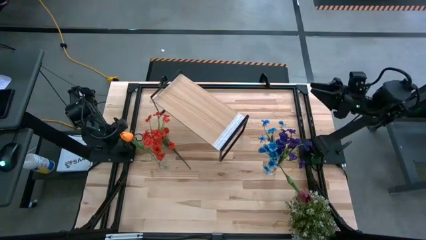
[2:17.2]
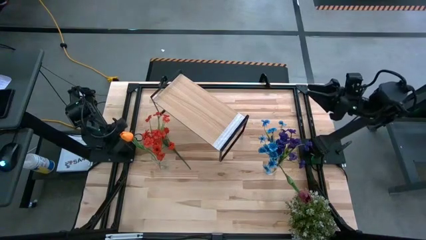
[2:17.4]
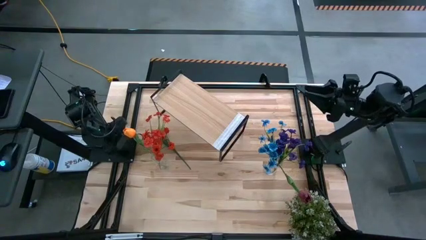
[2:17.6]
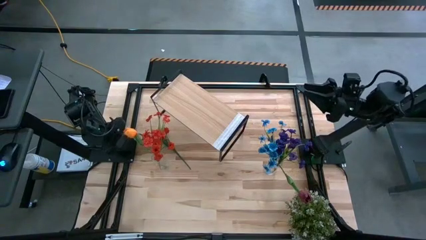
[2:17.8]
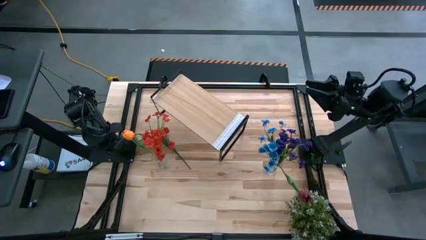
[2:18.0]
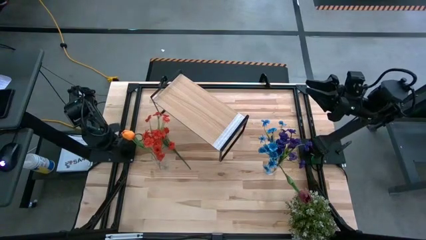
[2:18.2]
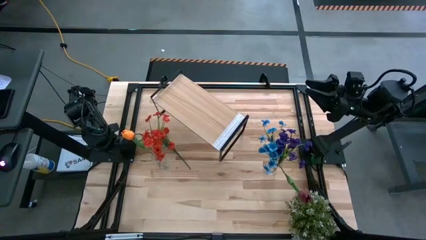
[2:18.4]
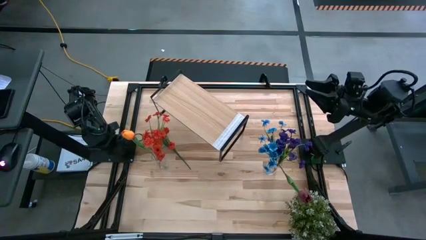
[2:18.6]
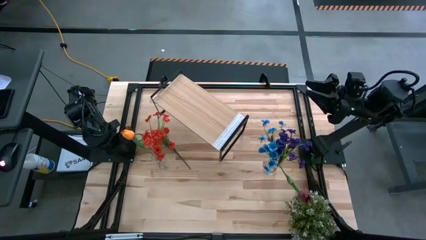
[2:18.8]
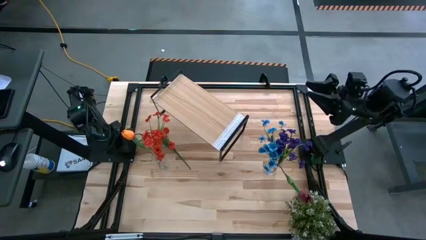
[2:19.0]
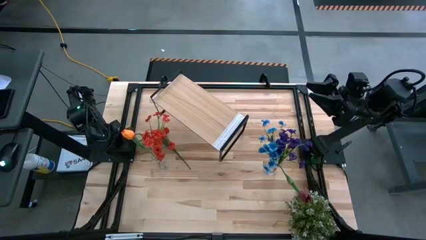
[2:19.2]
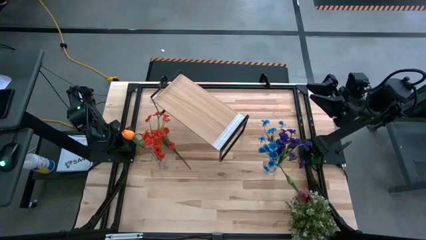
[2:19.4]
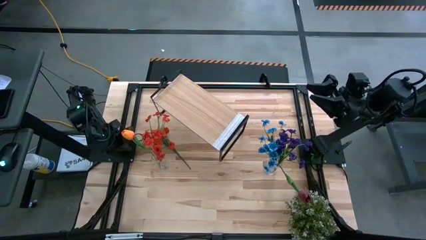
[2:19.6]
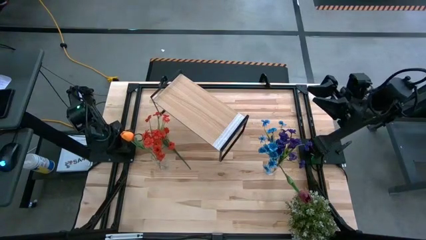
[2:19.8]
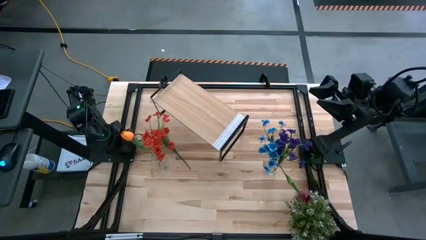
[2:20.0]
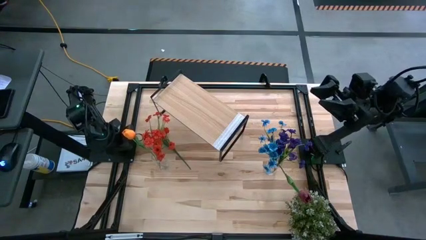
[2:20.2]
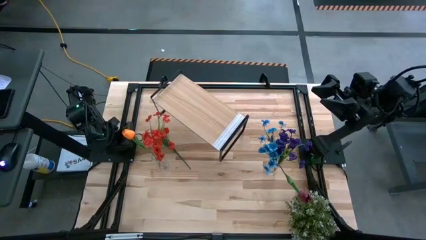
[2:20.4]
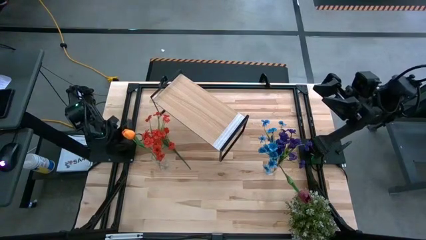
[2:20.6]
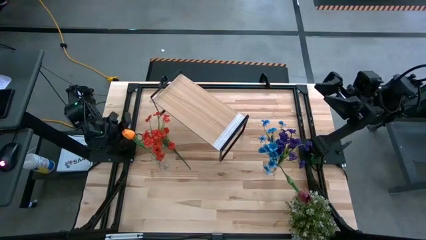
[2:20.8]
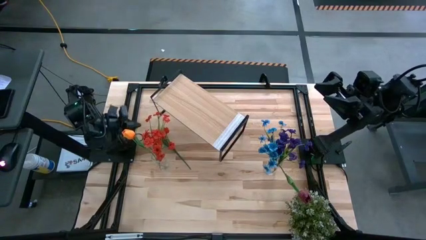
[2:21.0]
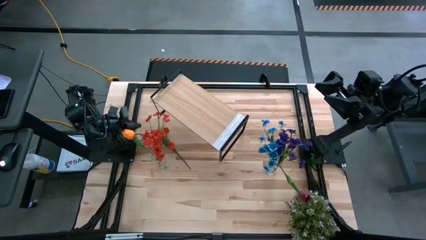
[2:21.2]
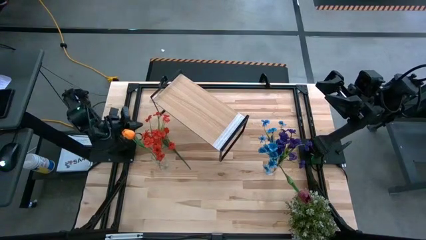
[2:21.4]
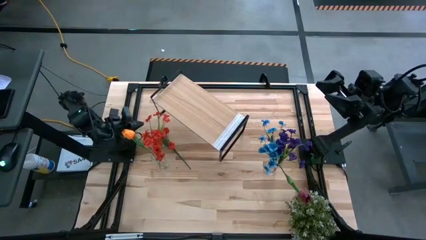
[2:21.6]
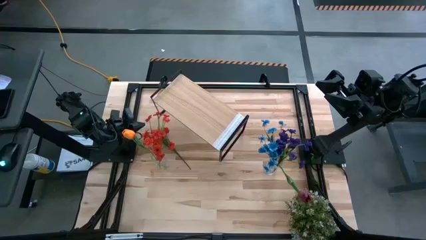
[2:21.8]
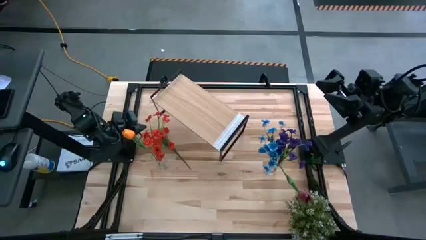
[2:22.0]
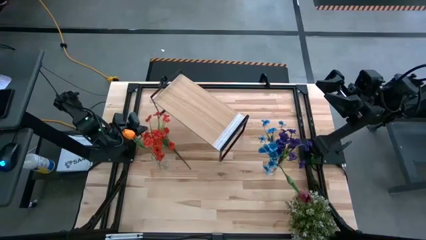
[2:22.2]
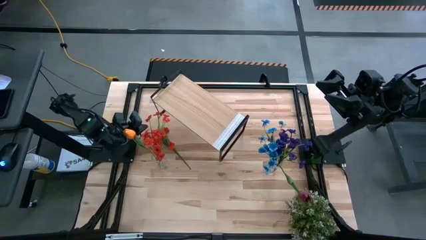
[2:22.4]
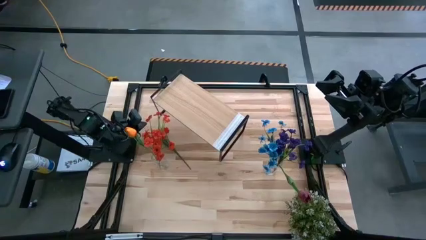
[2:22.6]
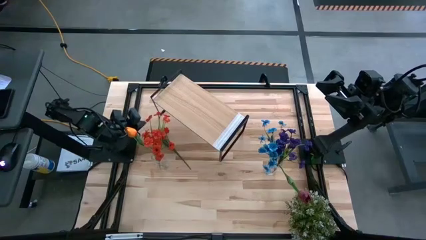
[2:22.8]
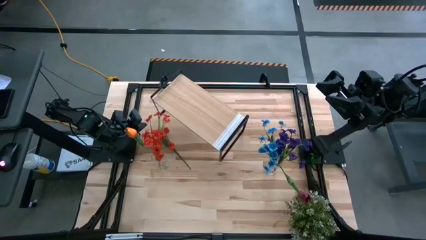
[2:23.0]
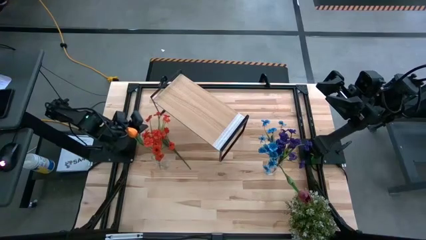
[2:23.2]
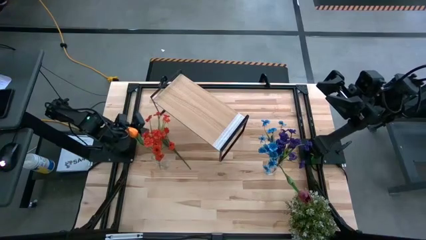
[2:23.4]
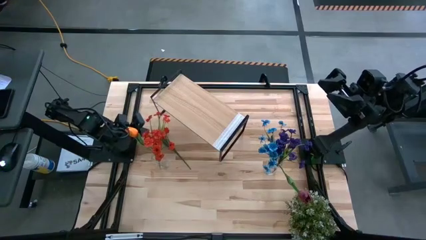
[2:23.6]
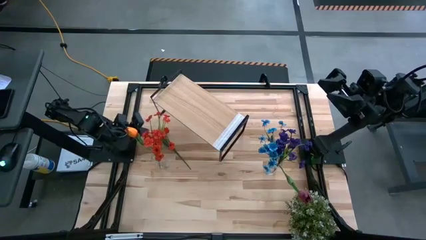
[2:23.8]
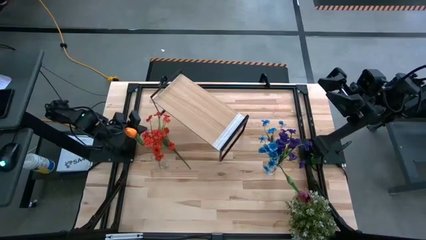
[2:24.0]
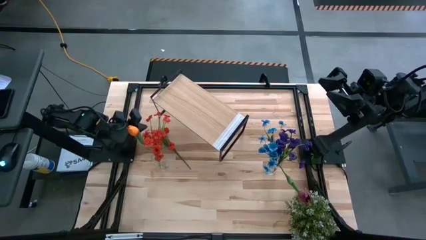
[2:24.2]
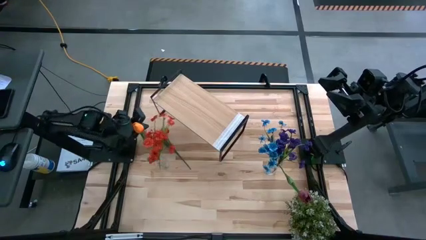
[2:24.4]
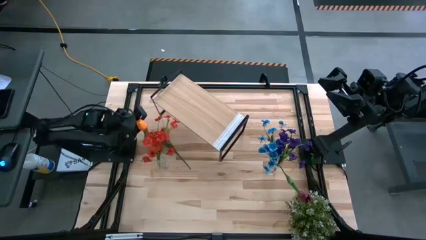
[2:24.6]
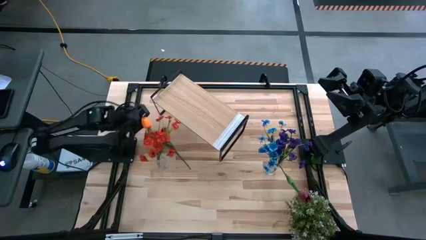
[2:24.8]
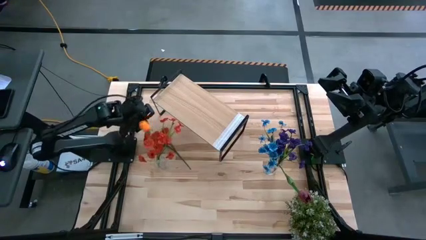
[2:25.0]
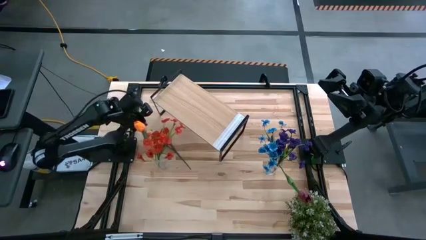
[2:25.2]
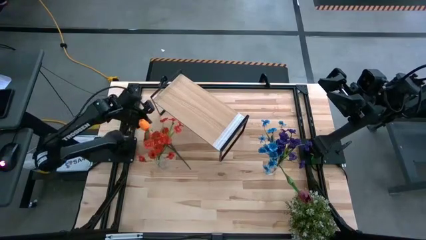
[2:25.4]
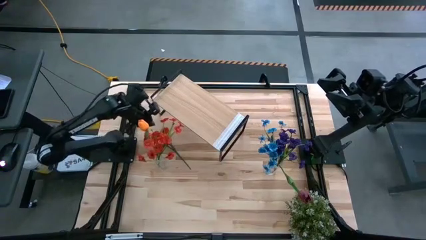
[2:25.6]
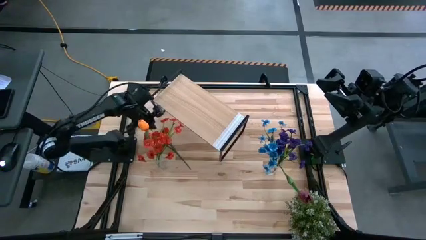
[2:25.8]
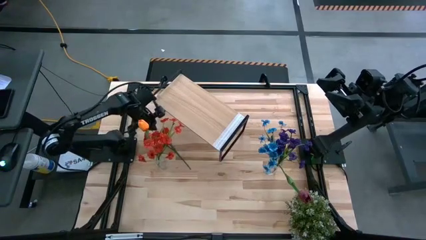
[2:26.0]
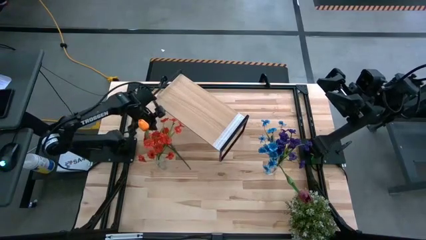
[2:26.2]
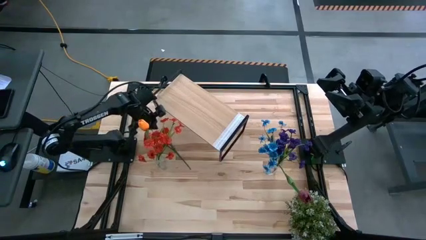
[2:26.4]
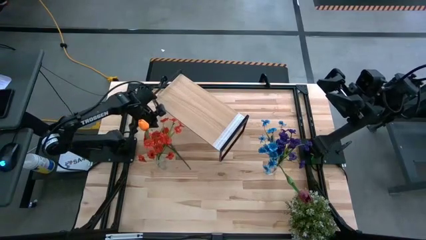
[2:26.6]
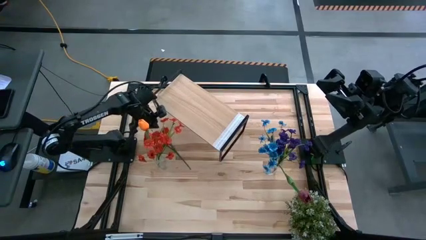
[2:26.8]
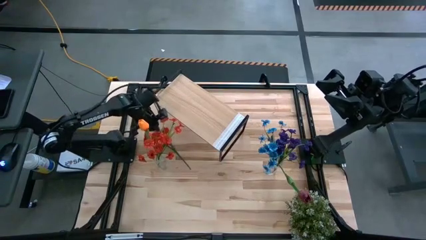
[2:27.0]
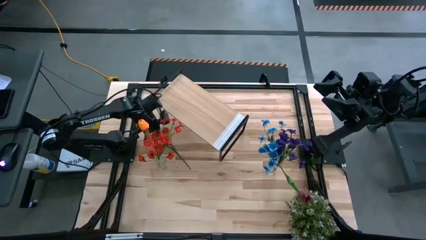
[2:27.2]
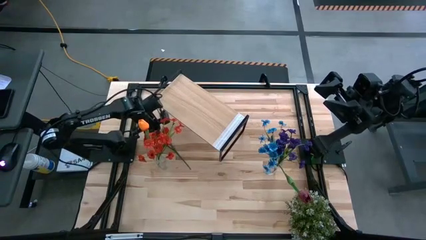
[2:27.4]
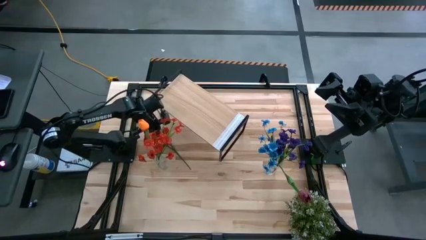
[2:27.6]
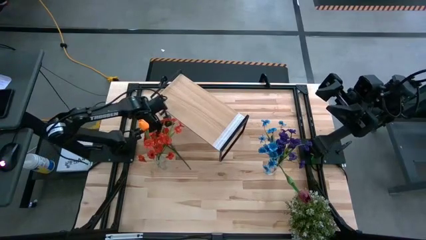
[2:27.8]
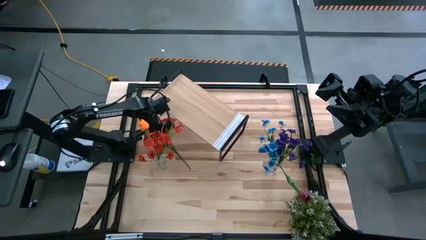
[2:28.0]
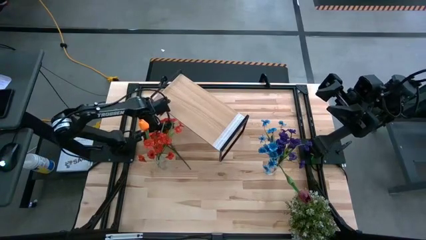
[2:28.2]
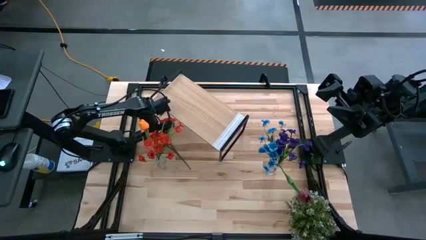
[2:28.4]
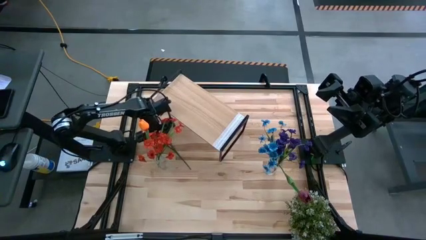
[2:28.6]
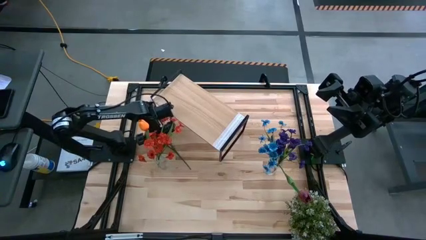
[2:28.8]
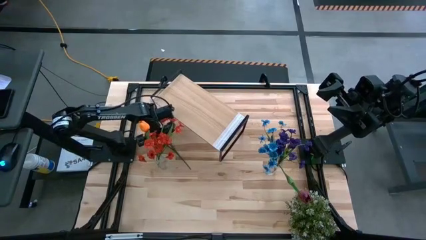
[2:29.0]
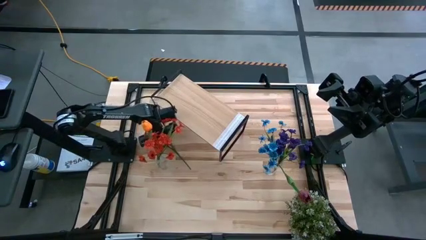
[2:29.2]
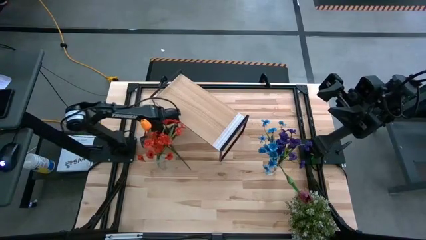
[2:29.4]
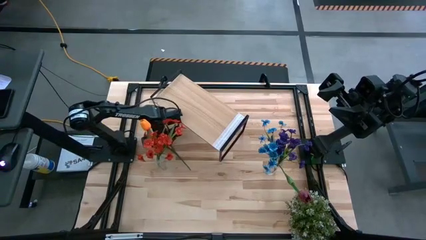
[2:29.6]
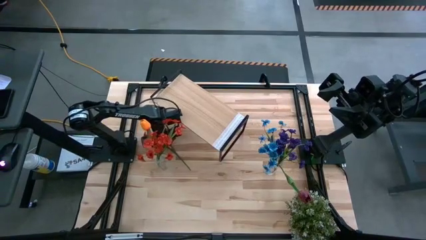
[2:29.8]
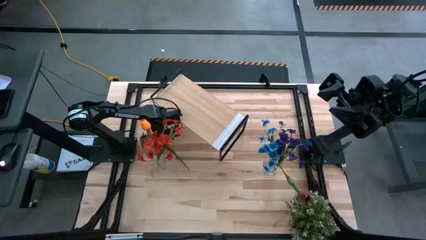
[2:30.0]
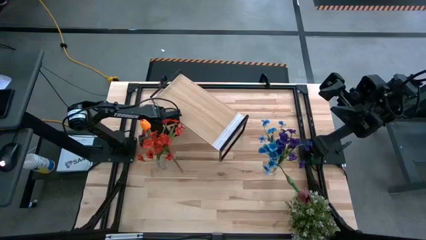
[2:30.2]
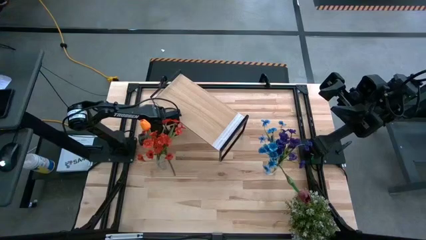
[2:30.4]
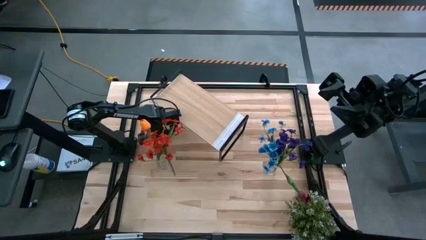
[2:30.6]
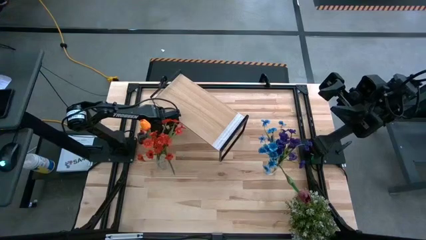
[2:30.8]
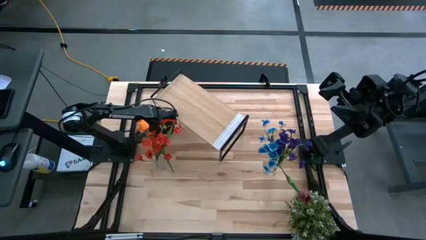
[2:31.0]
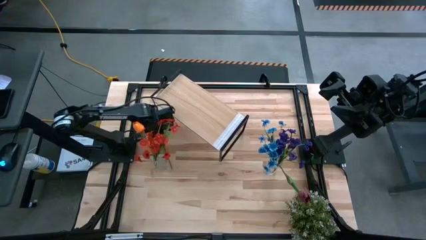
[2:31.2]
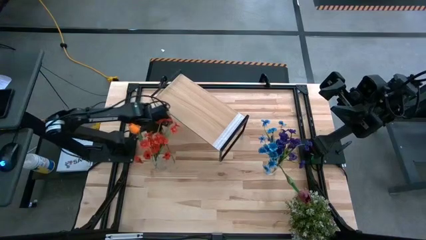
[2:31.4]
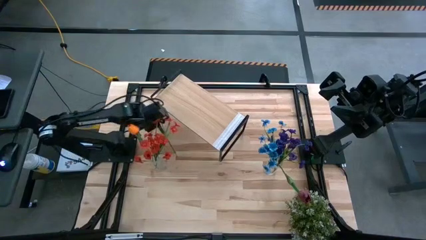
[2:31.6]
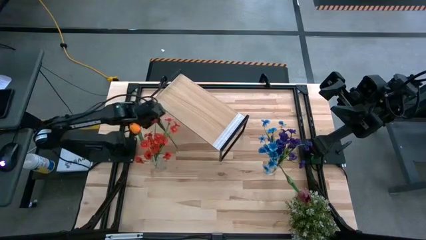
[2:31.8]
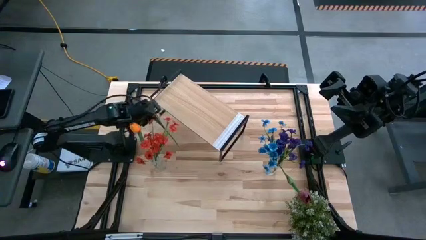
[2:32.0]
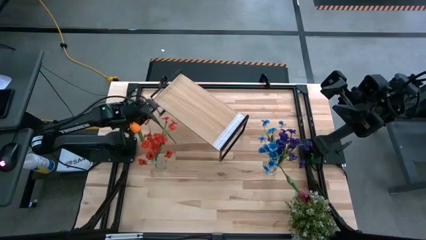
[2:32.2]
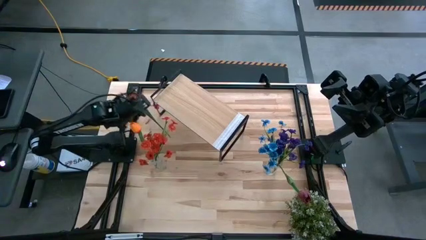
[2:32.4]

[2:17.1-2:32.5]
Task: Pick and place flowers into a vace then onto a shelf
Put the red flower into the left transparent vase

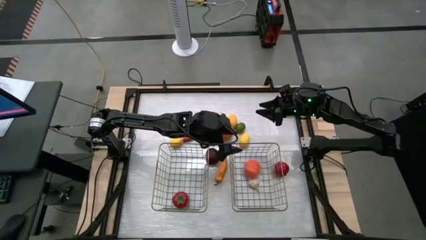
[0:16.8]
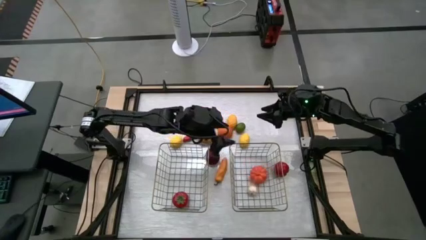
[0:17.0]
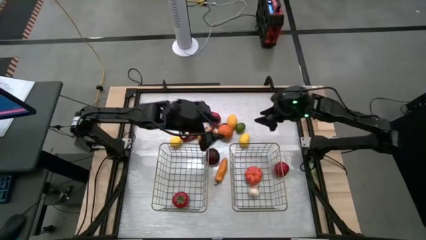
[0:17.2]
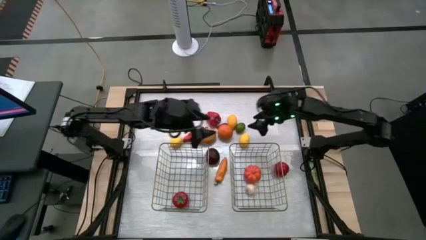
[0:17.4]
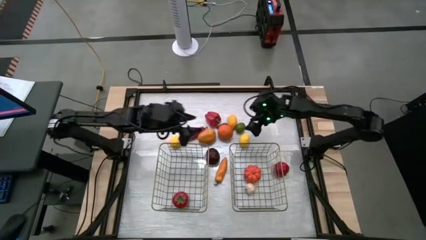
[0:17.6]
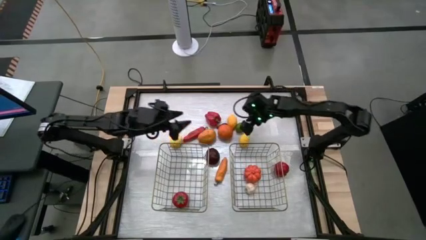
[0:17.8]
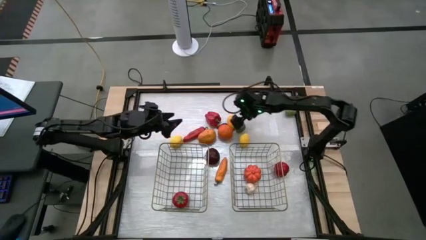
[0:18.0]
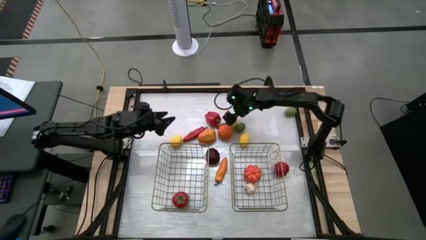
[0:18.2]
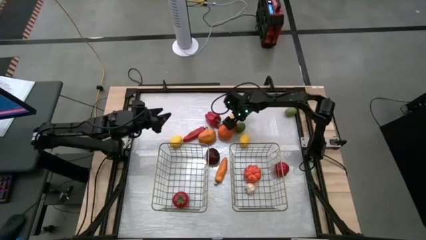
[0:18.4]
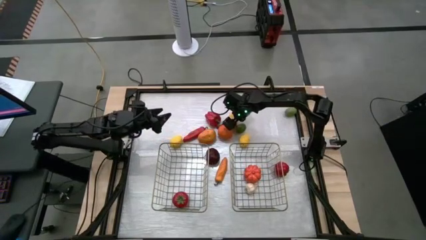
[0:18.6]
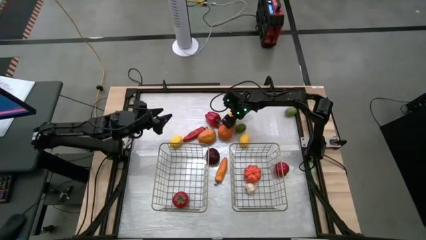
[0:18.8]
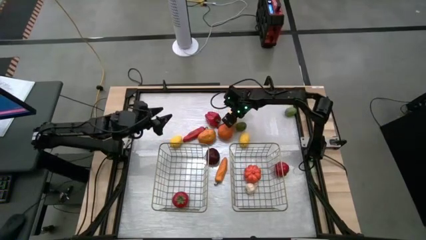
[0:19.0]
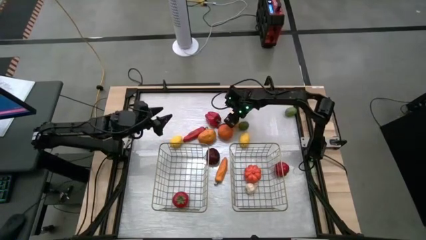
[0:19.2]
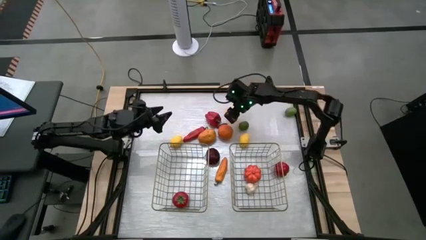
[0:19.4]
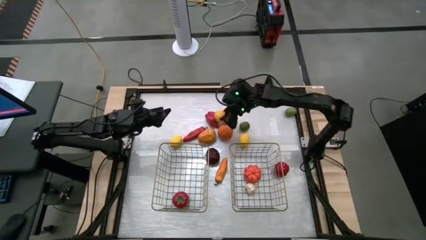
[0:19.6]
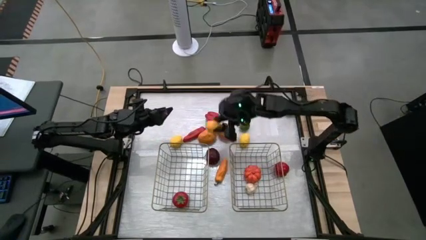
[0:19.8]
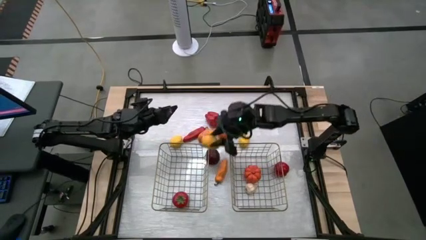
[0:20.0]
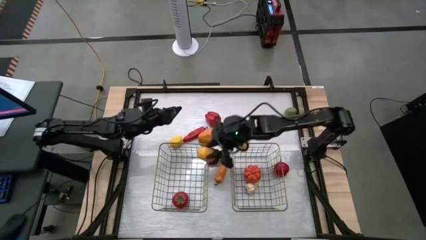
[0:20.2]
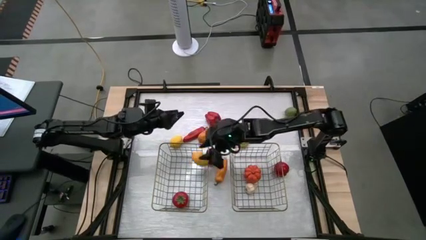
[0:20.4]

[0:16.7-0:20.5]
Task: Sort produce into baskets
Put the top lemon into the left brown wire basket
